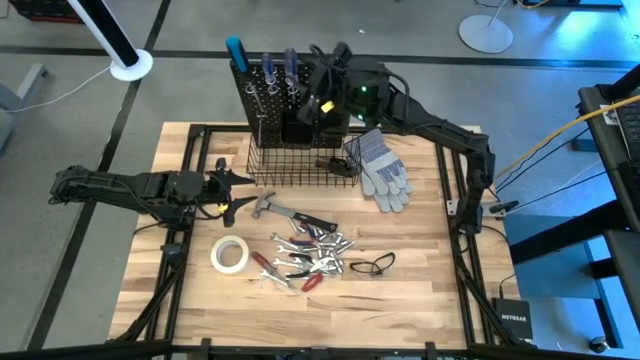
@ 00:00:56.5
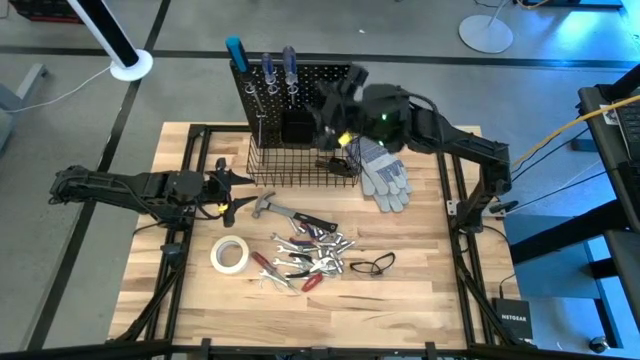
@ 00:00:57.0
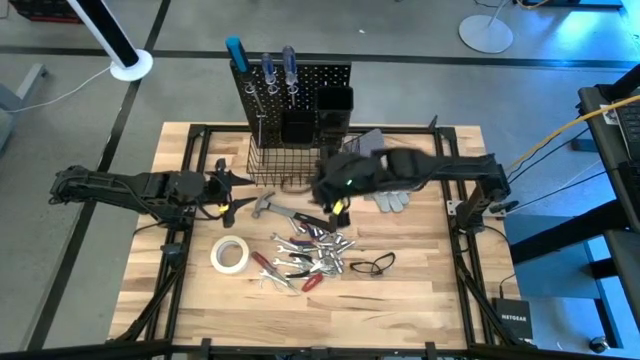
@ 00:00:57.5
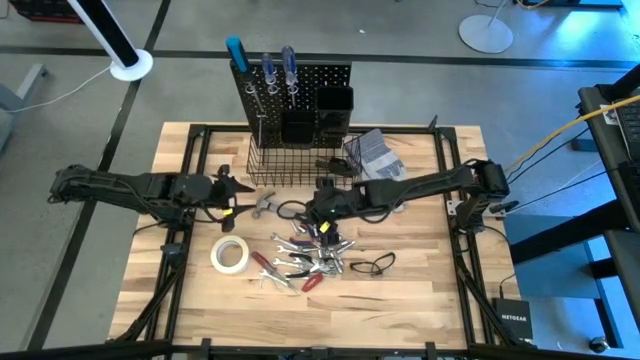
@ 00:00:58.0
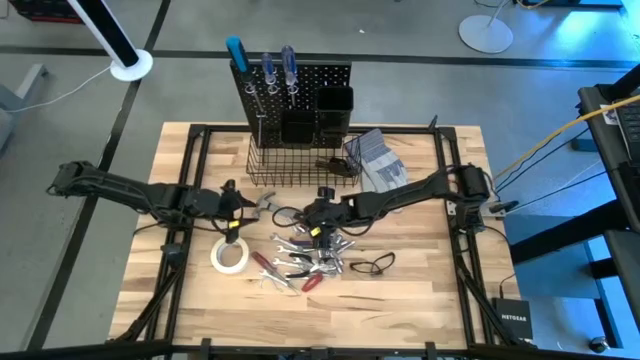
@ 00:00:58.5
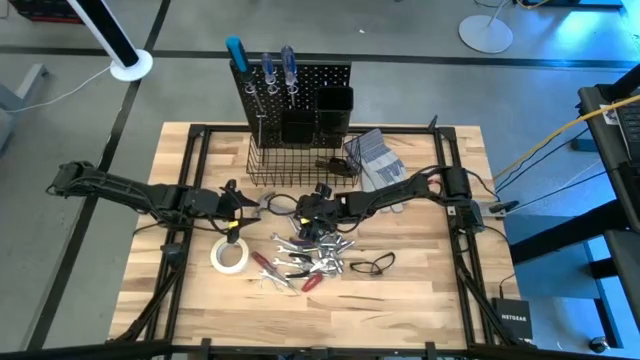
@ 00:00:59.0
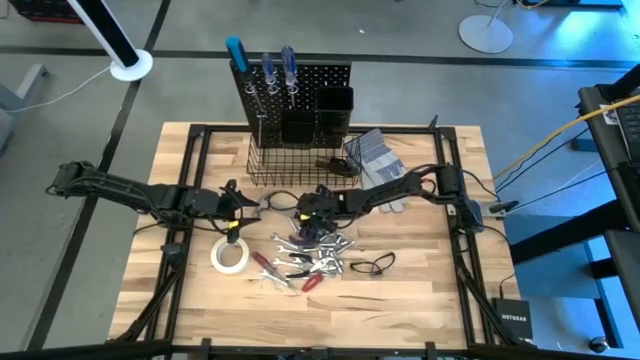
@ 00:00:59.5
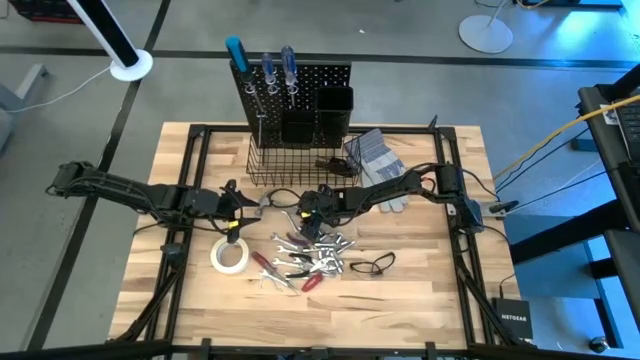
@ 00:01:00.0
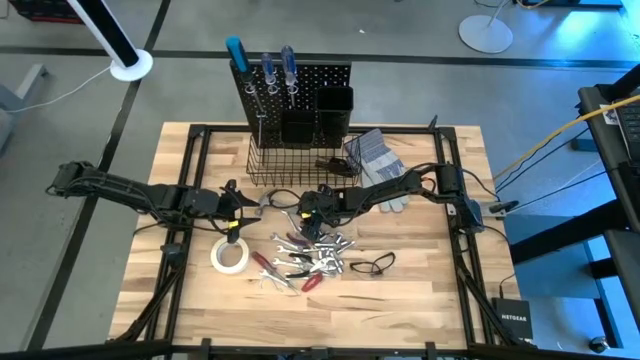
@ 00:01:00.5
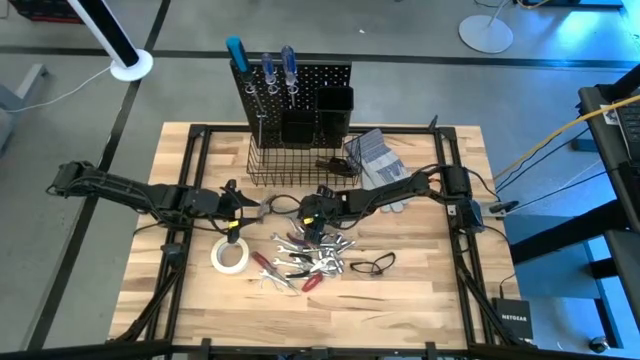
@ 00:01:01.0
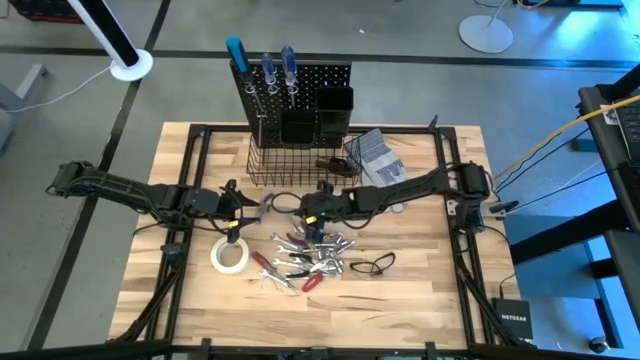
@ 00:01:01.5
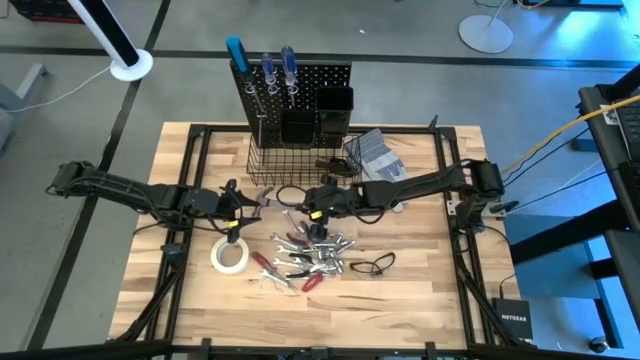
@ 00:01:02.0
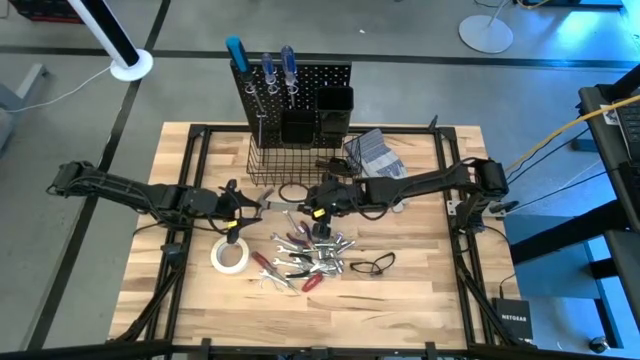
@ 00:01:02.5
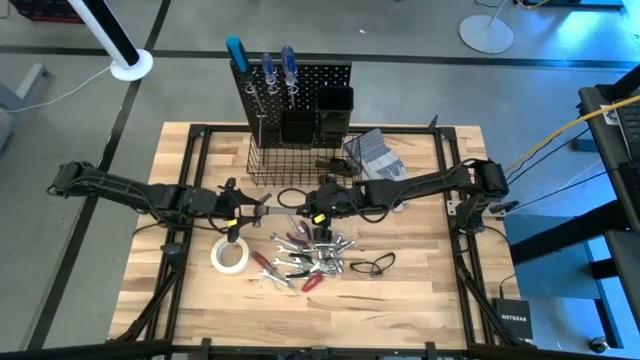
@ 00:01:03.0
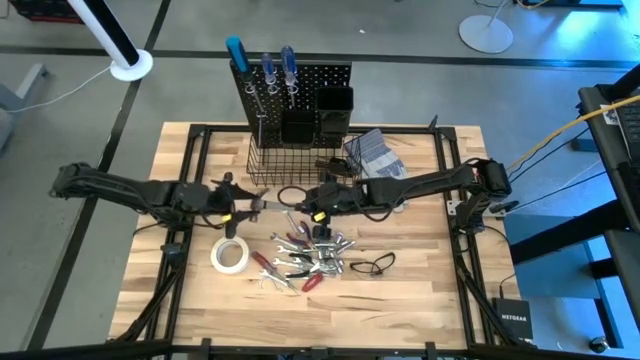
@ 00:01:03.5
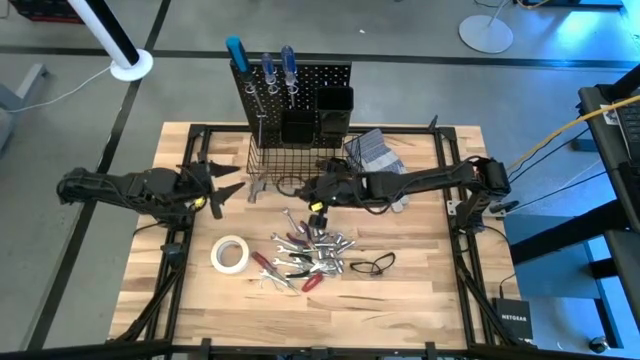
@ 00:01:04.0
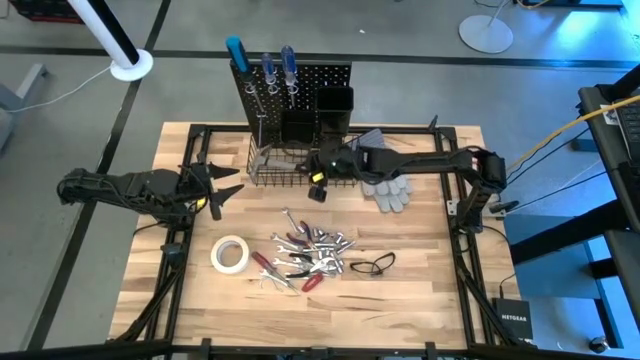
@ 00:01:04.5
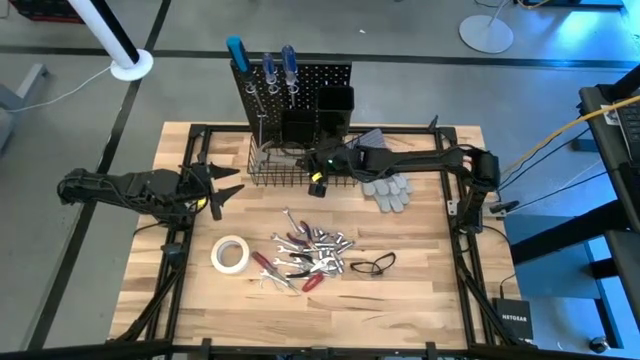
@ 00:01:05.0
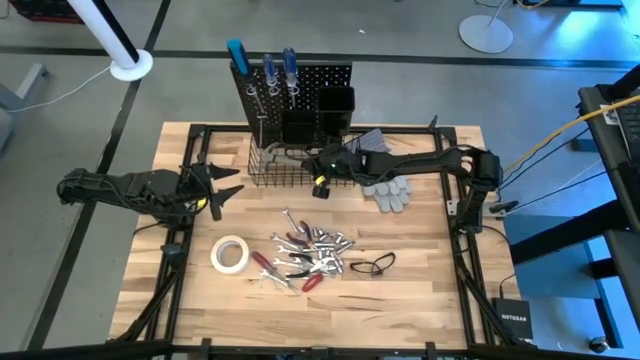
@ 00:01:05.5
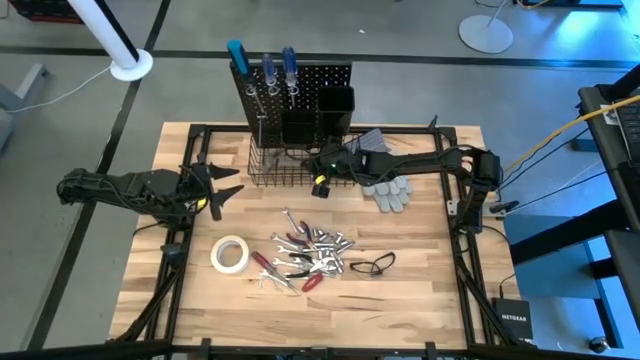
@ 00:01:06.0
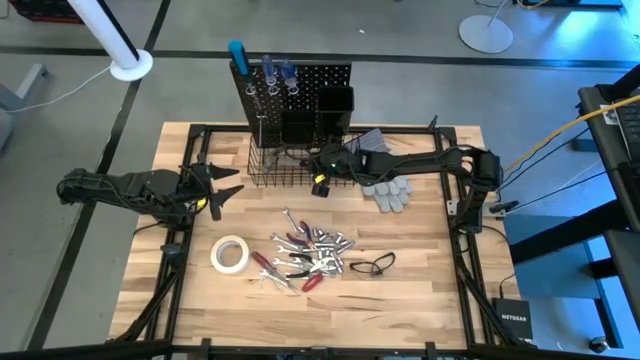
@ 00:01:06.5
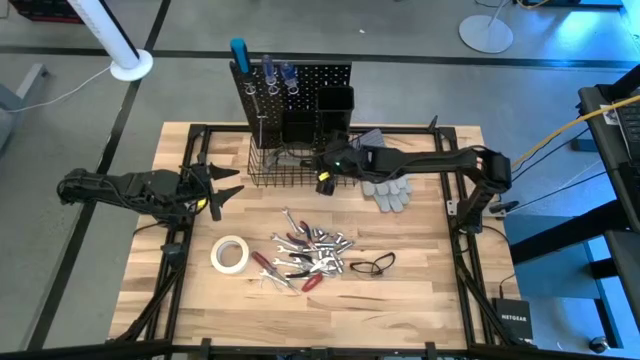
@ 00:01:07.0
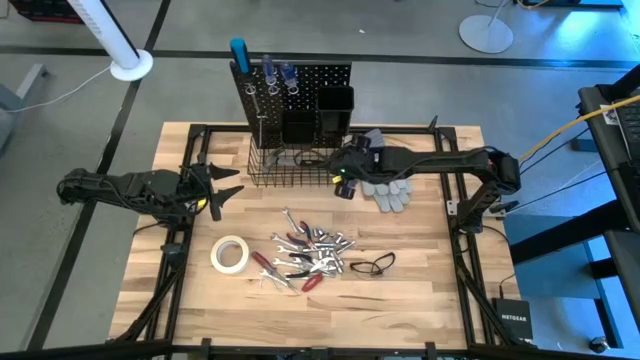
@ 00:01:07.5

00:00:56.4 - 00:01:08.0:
Task: Hang tools onto peg board
Put the hammer into the wire basket on the peg board

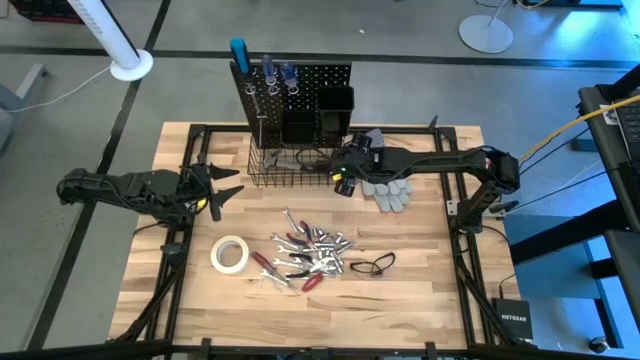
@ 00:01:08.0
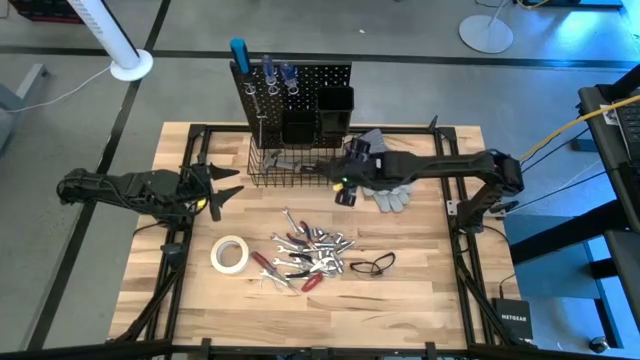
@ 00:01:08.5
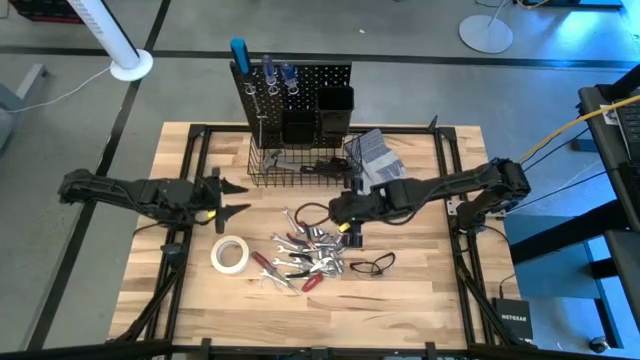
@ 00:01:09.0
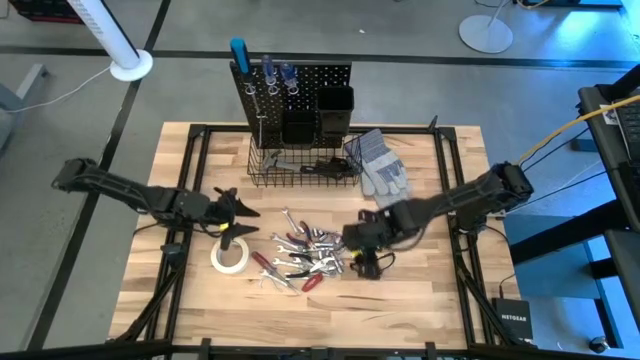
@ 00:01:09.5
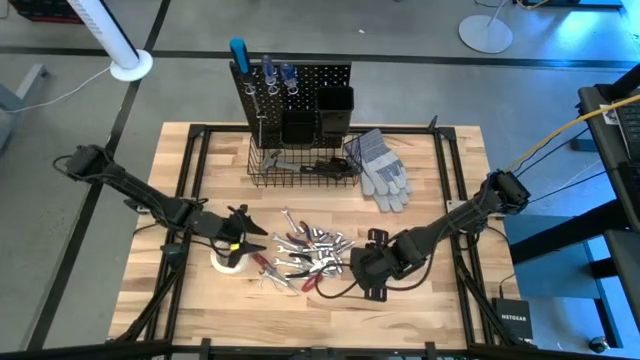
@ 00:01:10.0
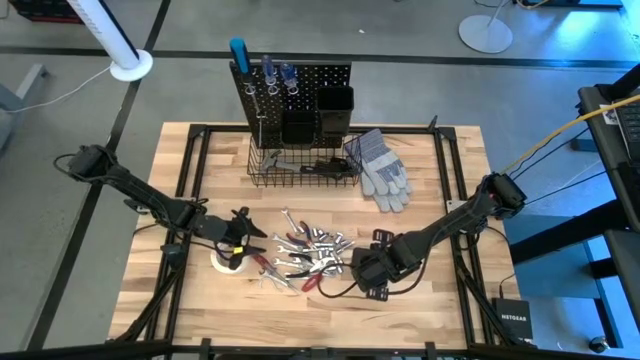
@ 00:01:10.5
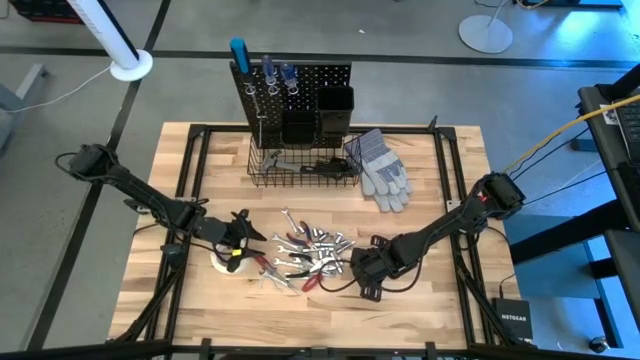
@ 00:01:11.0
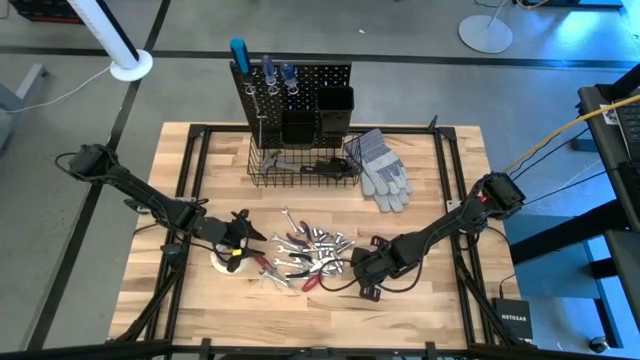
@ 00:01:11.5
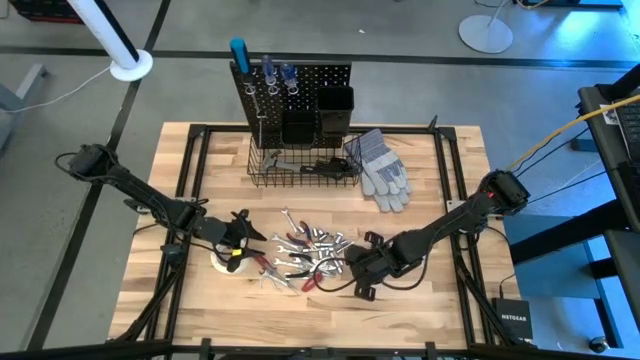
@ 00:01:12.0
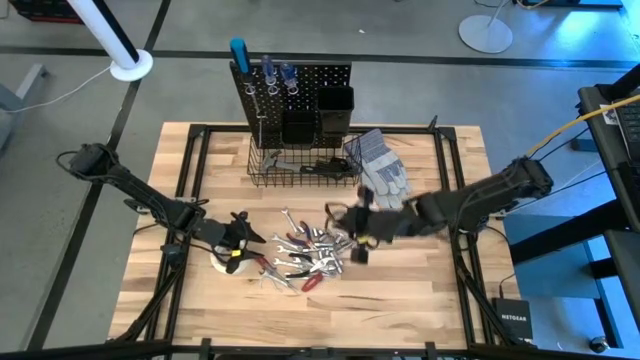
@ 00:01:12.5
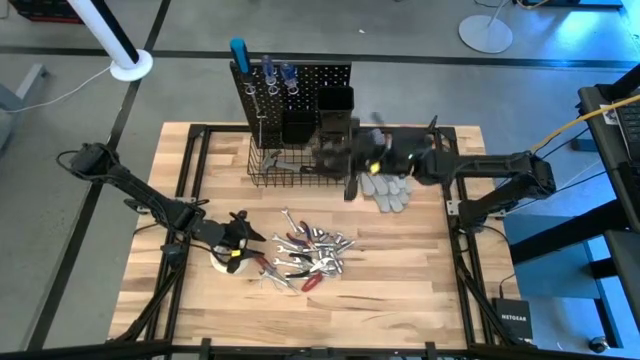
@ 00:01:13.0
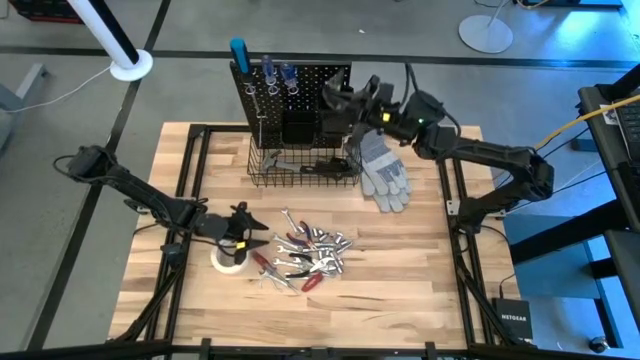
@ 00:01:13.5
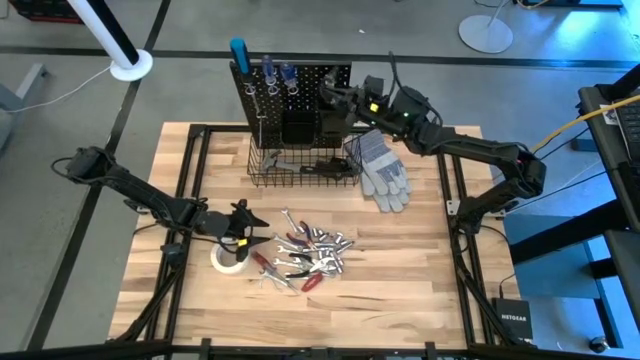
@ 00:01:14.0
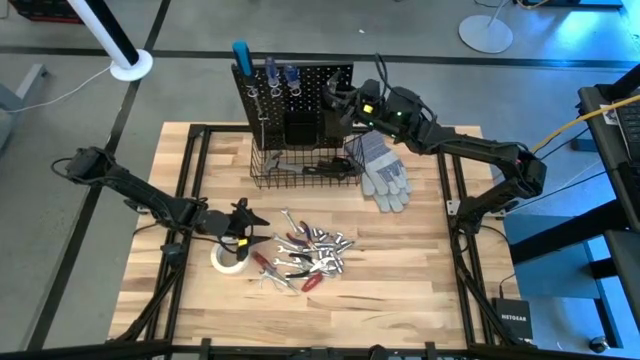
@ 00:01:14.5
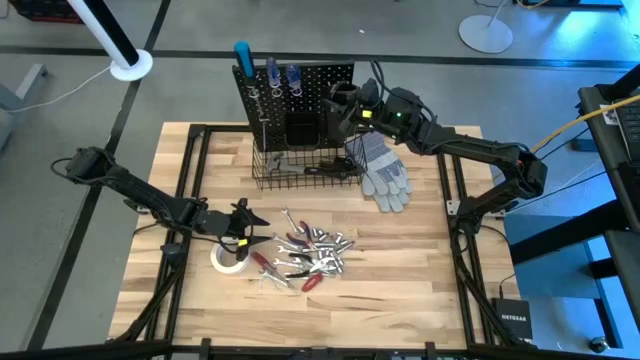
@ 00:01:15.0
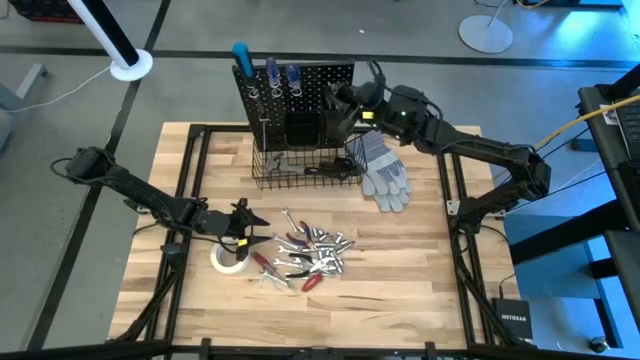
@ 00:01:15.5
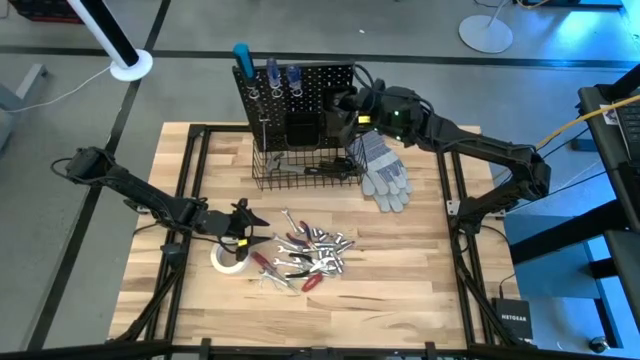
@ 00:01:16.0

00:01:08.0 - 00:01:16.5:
Put the safety glass into the right black bin on the peg board
